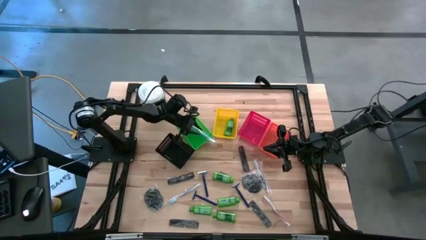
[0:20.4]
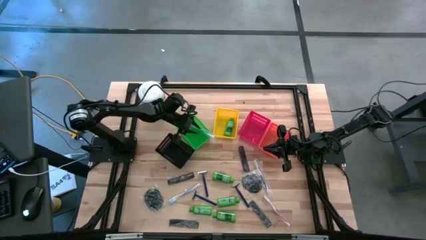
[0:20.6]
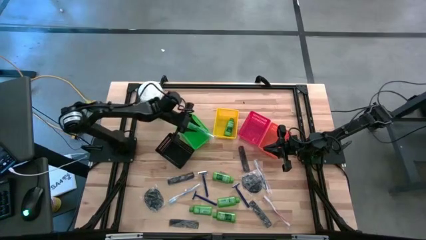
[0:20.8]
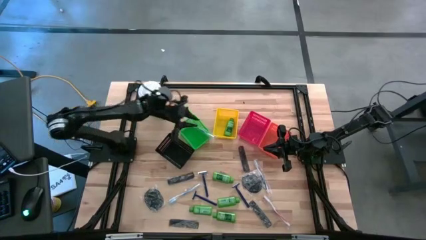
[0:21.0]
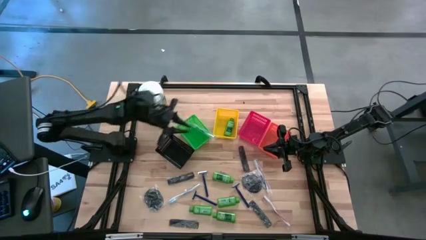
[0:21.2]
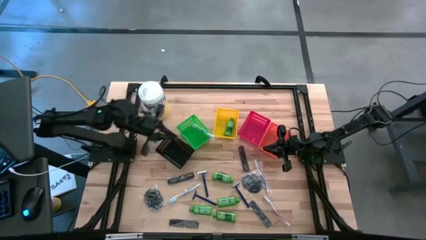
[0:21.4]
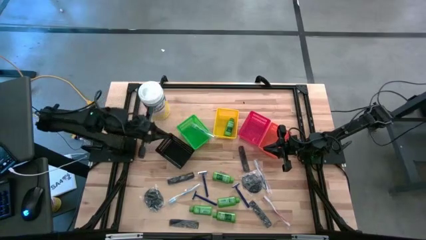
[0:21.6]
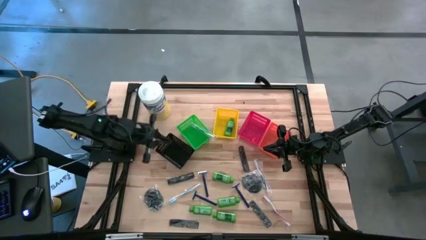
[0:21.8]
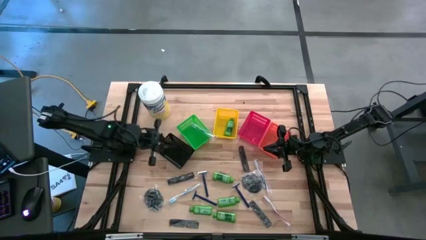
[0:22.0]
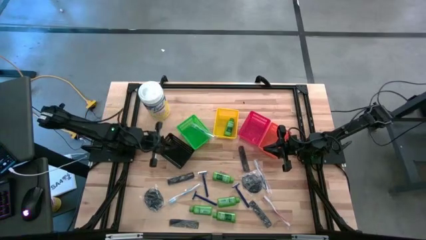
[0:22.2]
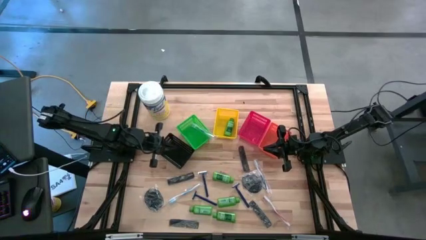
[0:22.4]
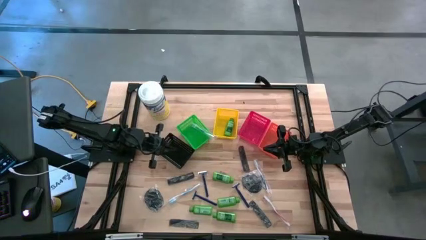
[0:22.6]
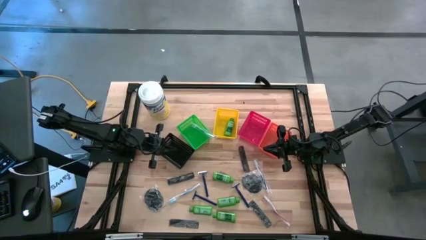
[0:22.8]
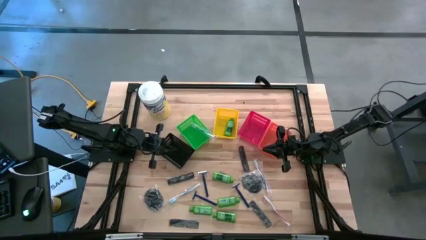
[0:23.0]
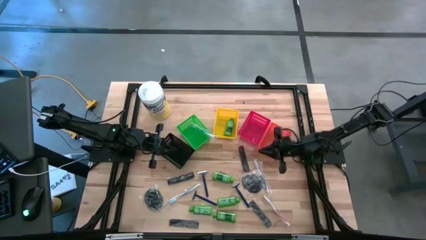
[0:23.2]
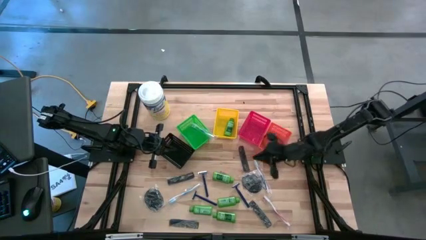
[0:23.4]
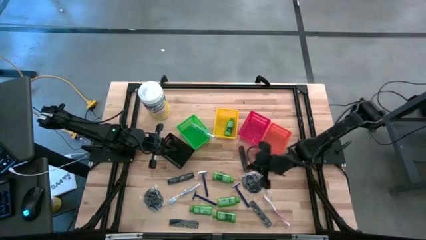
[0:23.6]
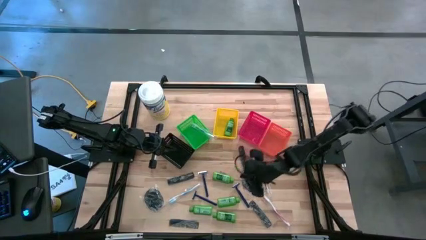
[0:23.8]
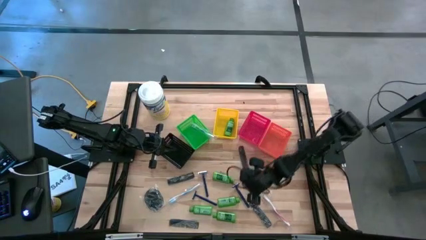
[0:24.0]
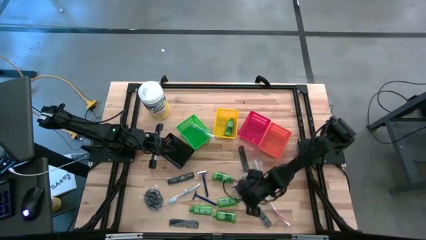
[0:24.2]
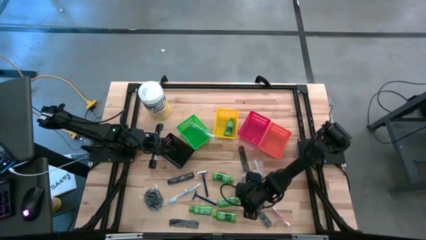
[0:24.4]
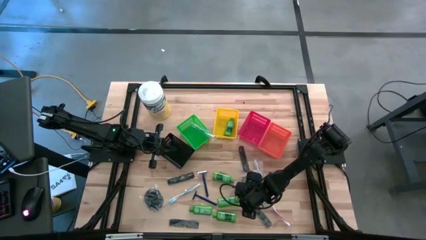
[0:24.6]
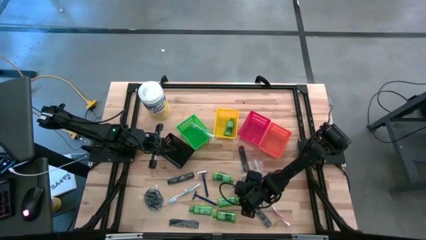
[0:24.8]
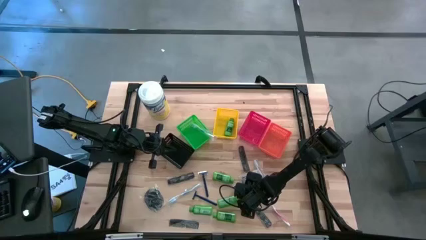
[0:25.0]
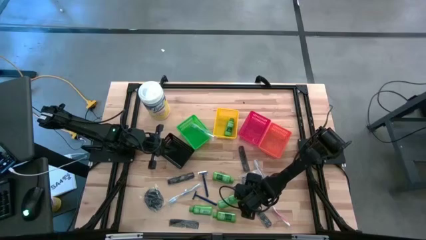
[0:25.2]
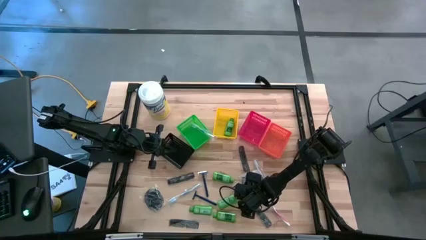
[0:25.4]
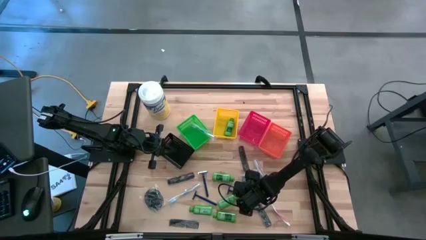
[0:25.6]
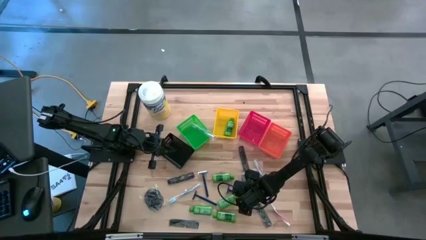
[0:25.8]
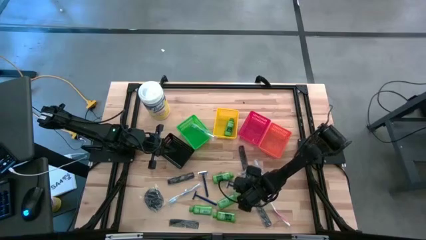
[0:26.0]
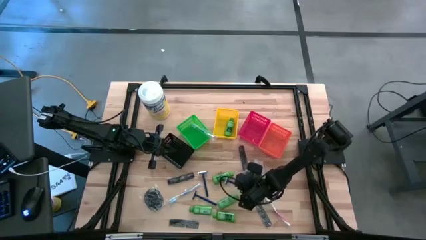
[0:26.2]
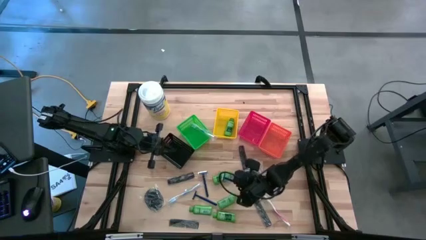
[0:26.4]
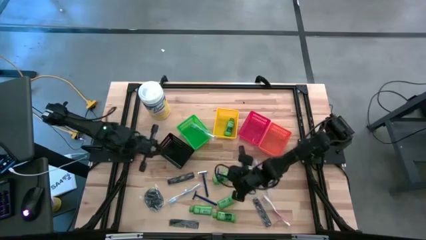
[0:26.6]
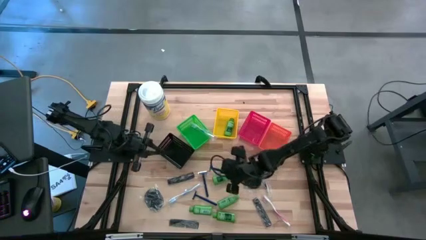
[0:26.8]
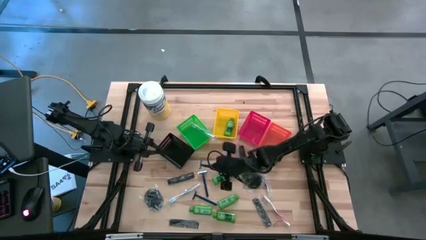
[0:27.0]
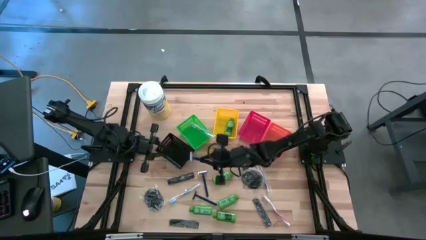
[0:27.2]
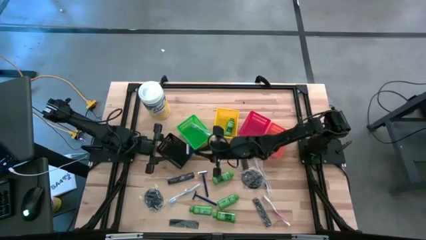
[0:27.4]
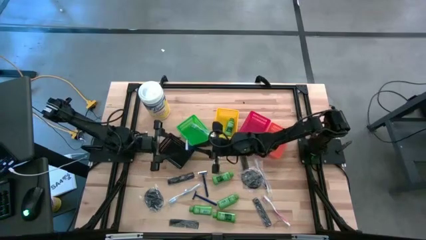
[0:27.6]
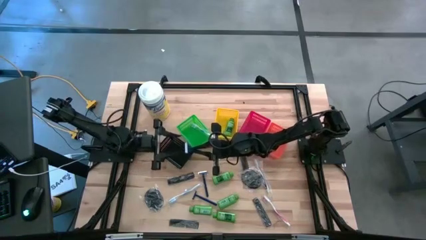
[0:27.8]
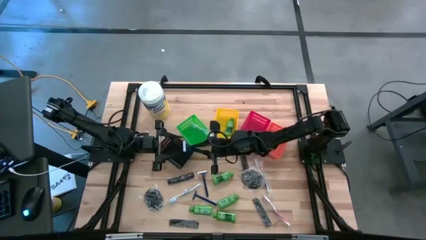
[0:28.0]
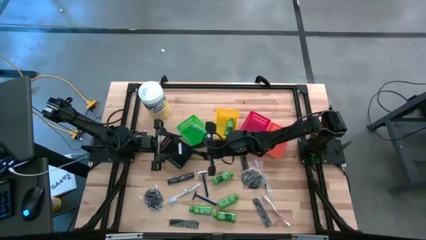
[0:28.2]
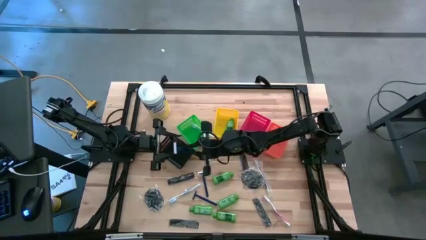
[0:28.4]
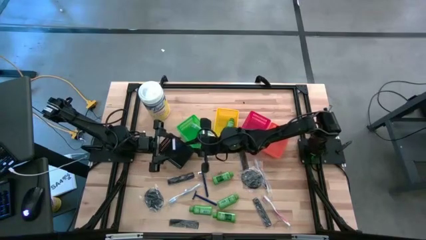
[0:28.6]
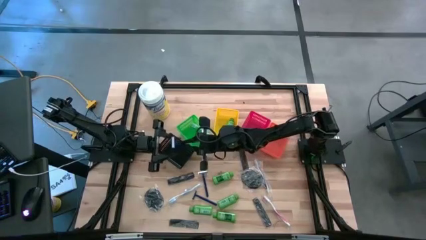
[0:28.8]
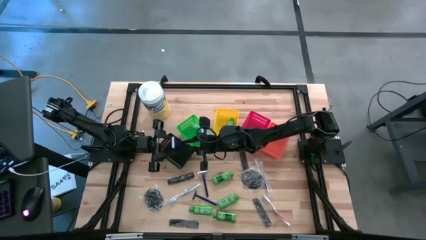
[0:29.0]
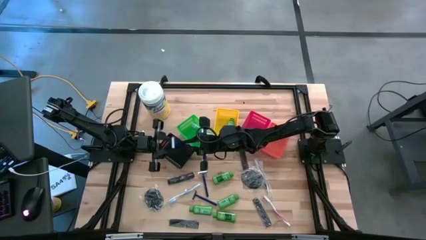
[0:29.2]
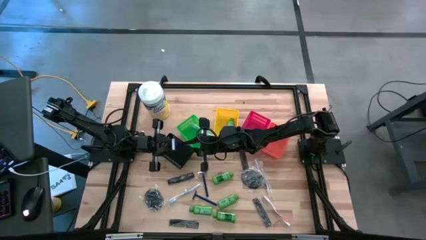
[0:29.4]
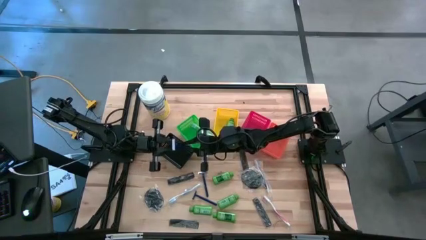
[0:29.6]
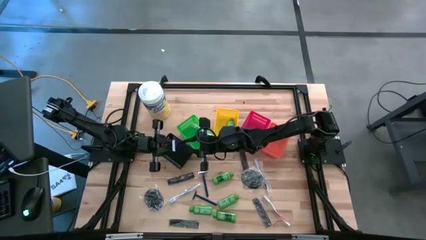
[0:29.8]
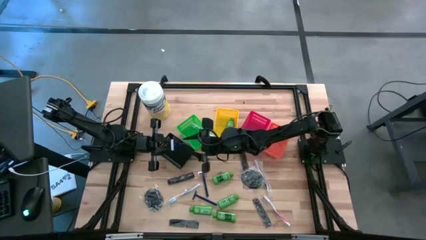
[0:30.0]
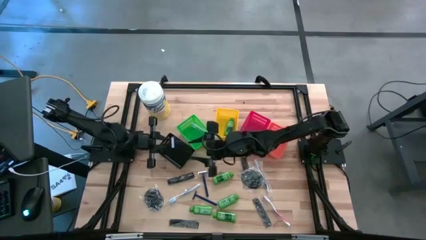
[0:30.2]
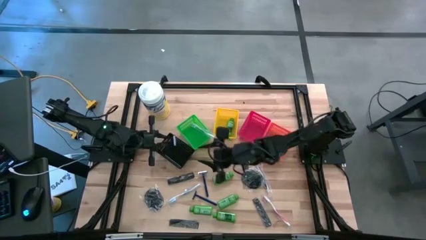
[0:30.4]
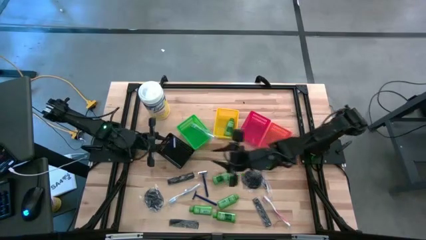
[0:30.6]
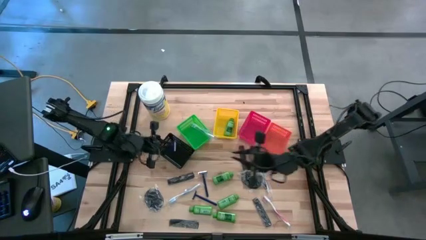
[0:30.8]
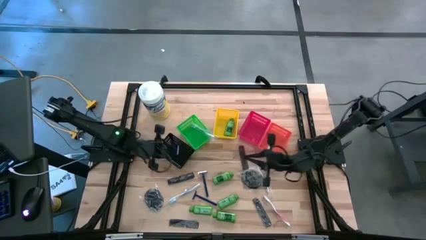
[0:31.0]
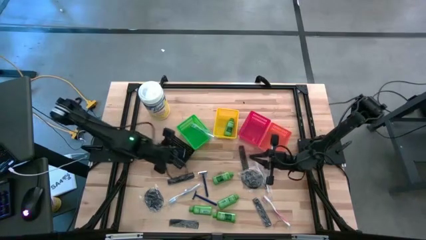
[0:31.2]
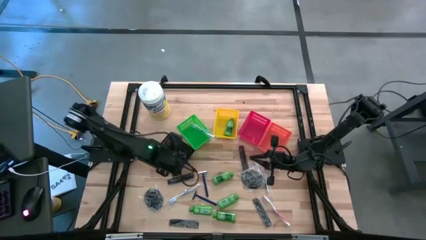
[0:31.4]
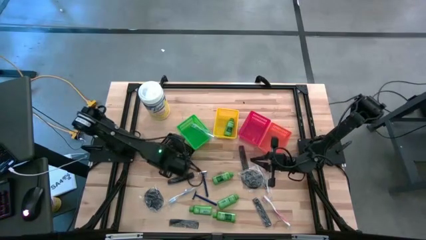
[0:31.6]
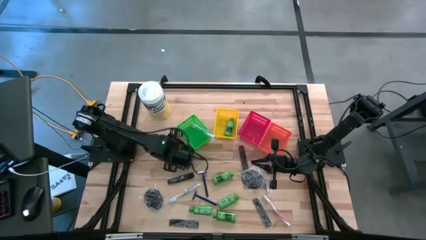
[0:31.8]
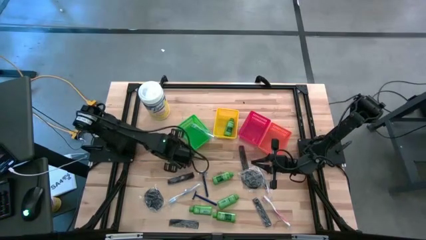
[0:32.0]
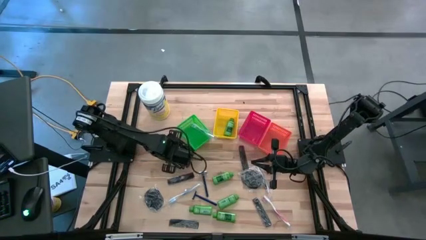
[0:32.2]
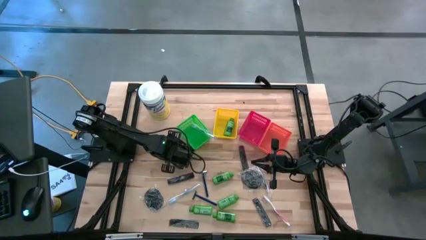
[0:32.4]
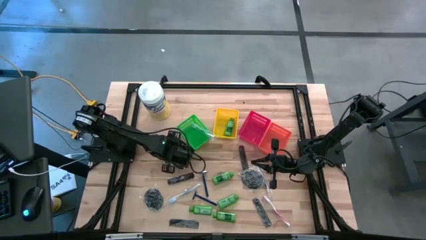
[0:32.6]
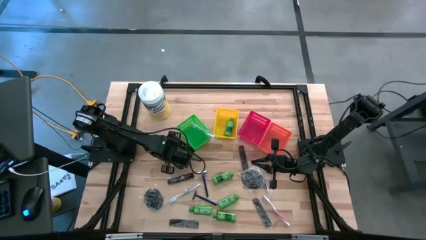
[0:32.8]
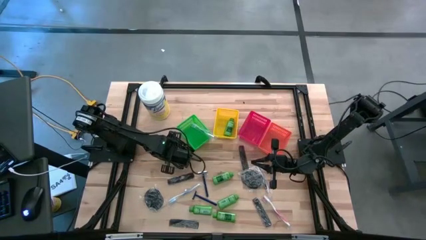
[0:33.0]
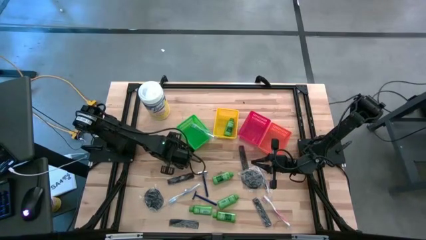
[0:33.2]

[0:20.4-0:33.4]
Task: Pick & Place Travel size toiletries
Put the blue razor into the black bin

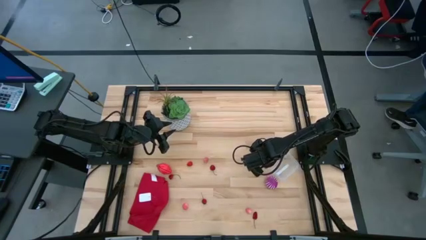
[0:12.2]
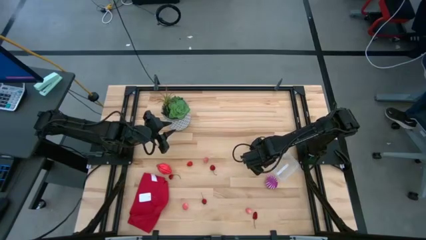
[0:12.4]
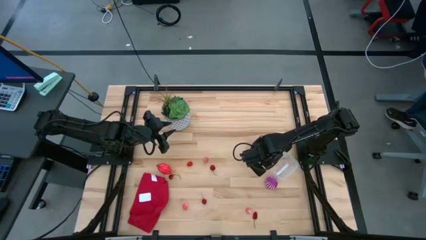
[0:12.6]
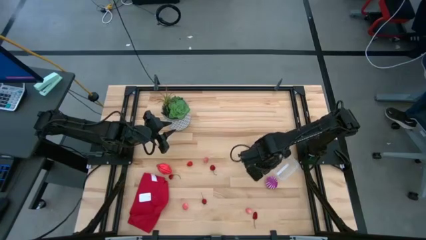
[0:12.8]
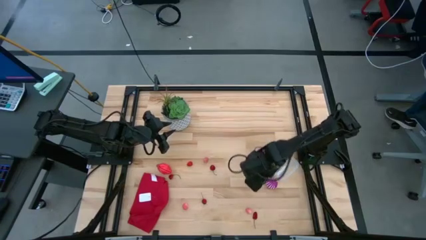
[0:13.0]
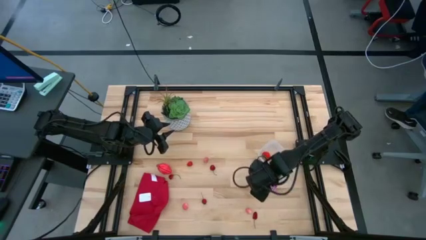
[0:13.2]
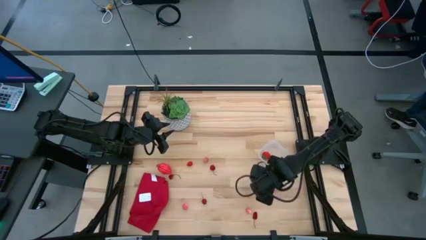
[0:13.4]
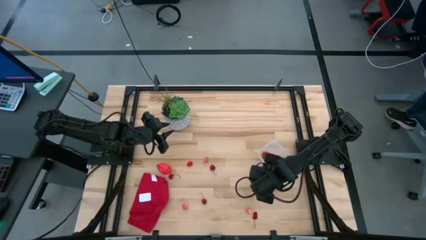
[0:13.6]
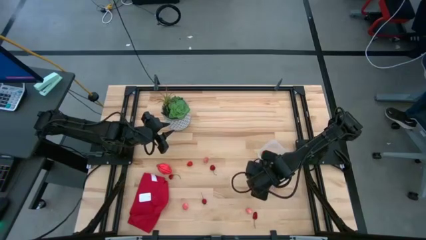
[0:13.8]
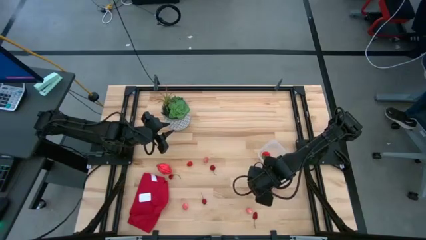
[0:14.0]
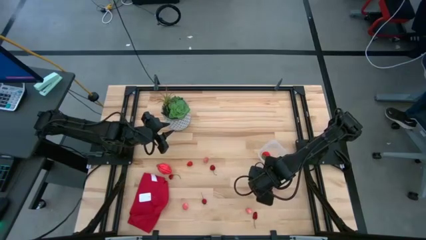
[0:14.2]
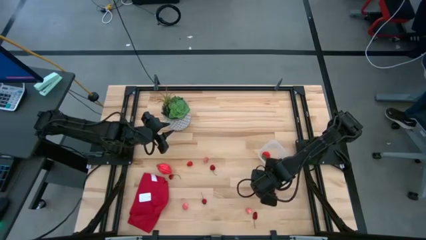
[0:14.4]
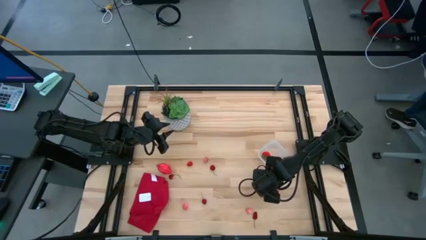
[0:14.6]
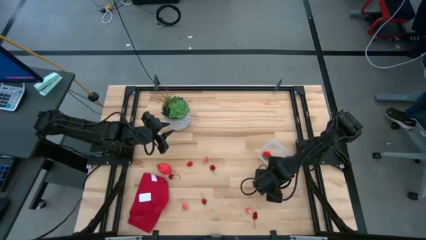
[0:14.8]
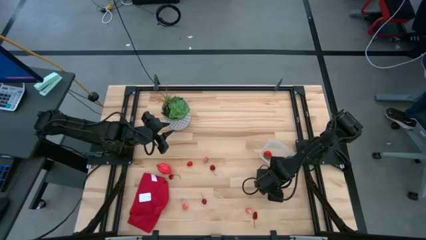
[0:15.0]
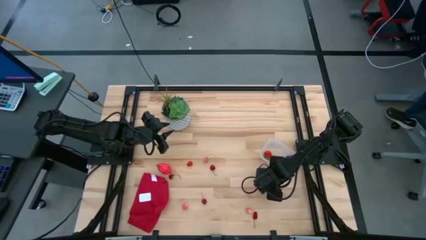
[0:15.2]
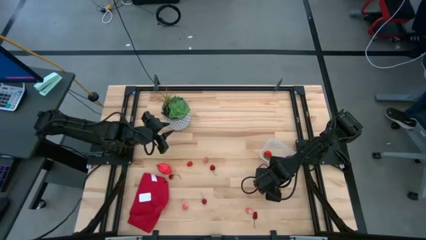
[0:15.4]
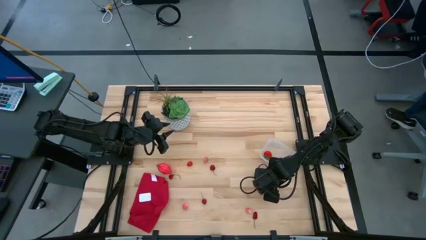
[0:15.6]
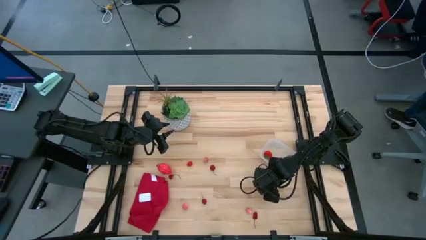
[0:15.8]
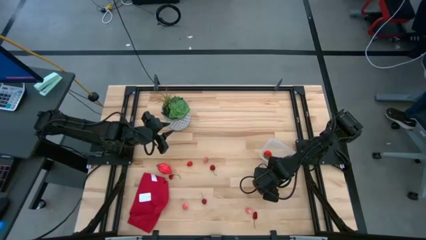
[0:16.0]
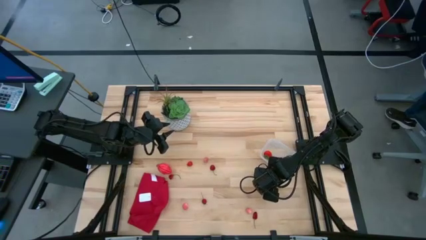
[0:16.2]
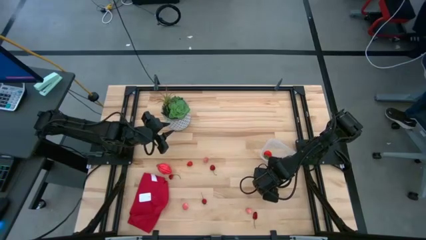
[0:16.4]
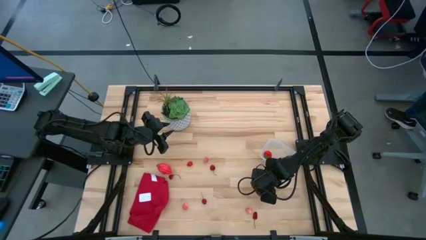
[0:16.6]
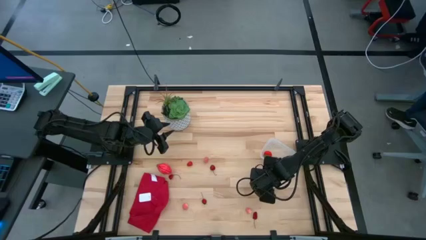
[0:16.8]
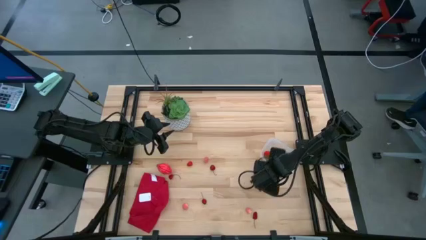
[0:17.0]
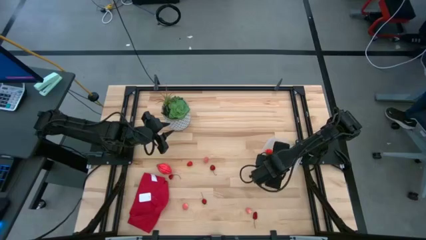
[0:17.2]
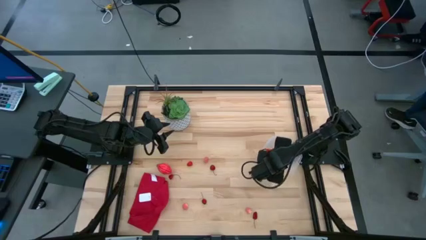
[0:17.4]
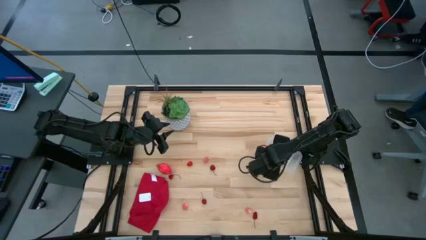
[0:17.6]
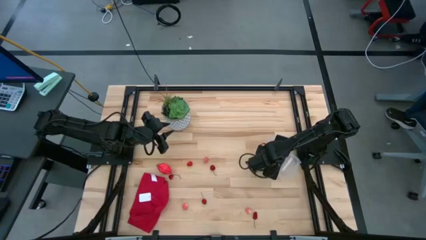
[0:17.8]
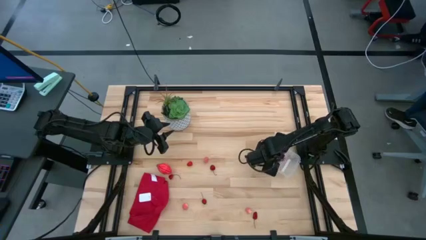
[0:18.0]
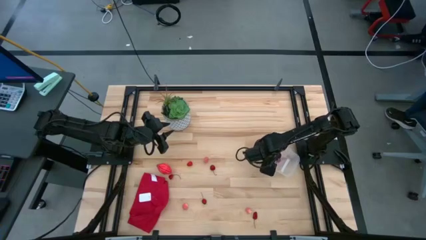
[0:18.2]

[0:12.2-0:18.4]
Task: Pick and placing Produce into tupperware
Put the purple onion into the transparent bin
